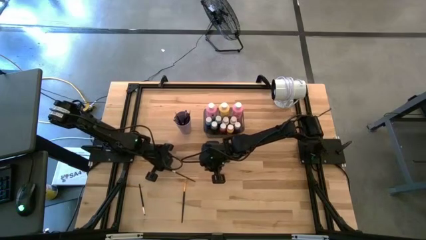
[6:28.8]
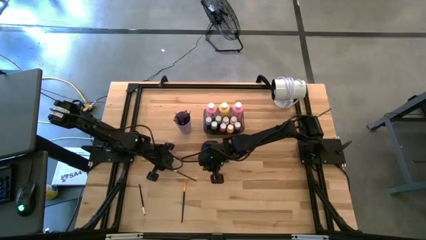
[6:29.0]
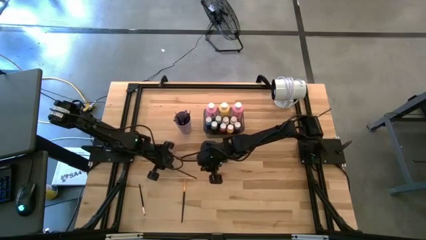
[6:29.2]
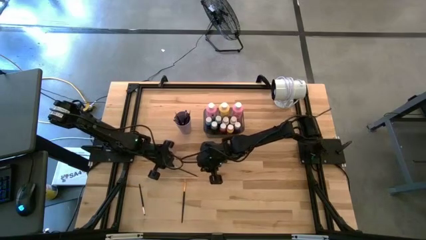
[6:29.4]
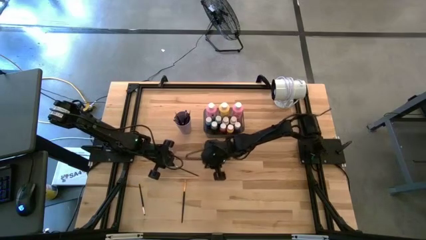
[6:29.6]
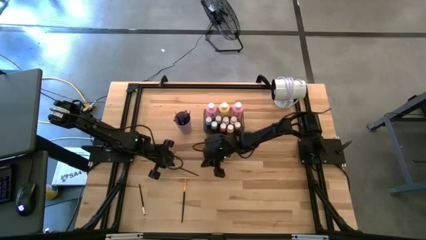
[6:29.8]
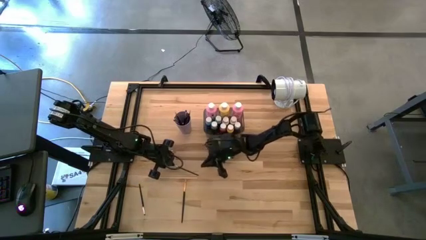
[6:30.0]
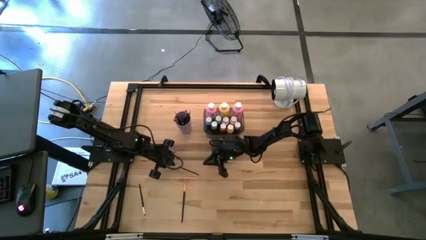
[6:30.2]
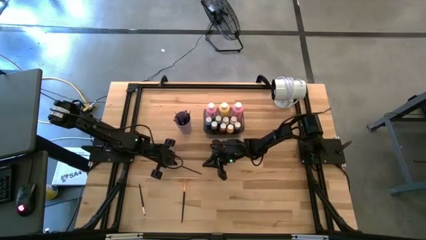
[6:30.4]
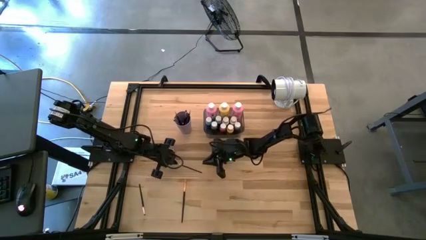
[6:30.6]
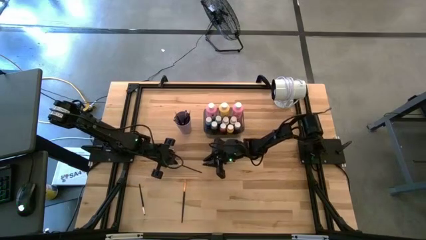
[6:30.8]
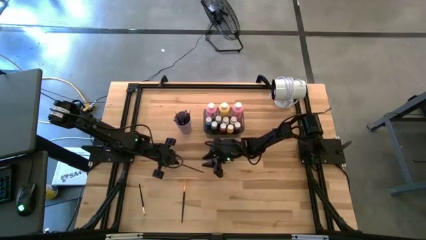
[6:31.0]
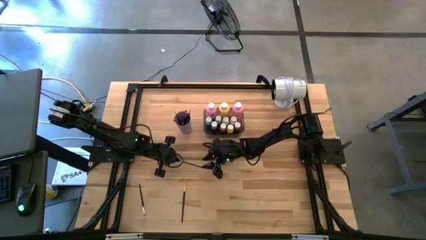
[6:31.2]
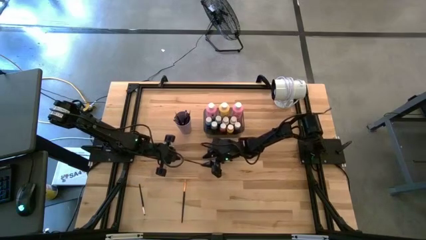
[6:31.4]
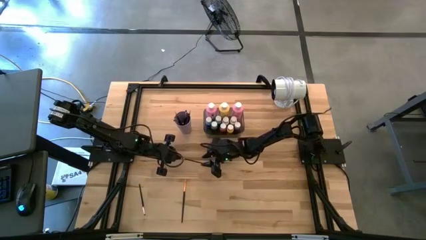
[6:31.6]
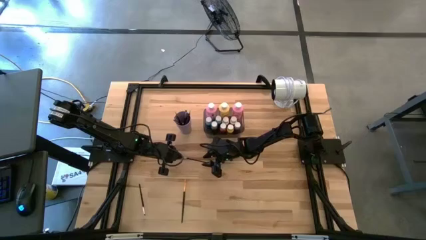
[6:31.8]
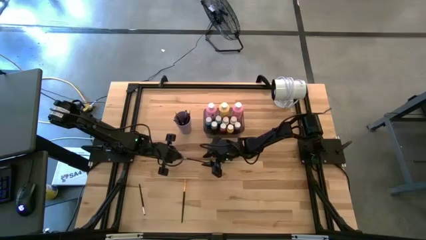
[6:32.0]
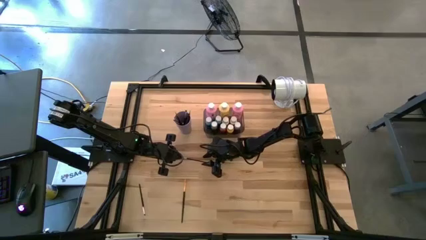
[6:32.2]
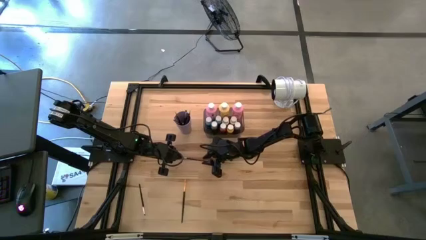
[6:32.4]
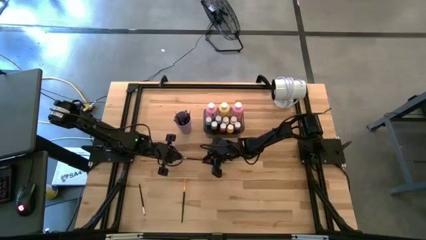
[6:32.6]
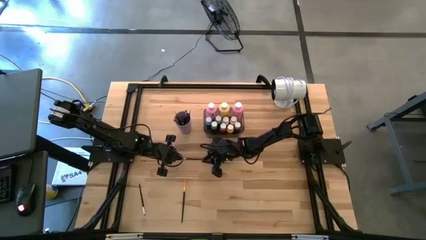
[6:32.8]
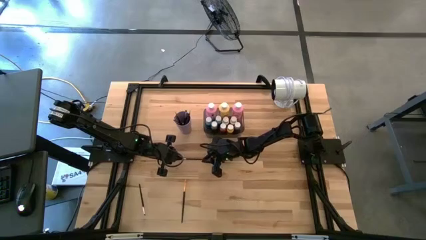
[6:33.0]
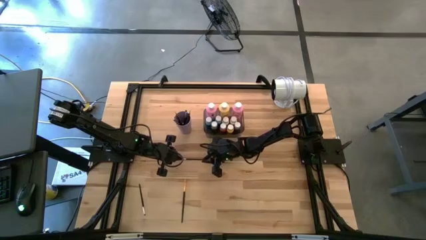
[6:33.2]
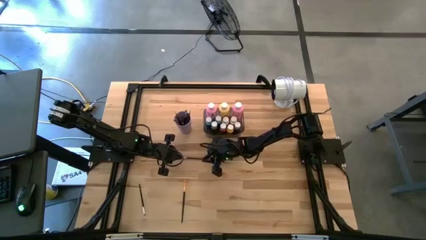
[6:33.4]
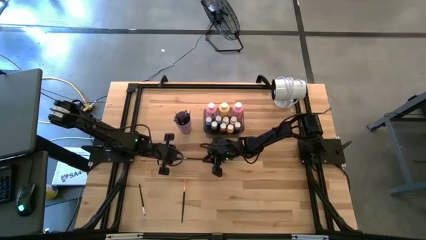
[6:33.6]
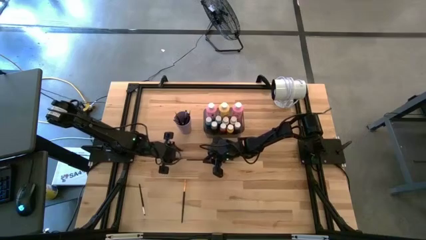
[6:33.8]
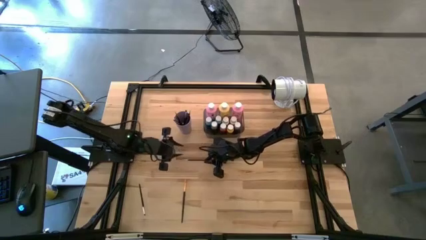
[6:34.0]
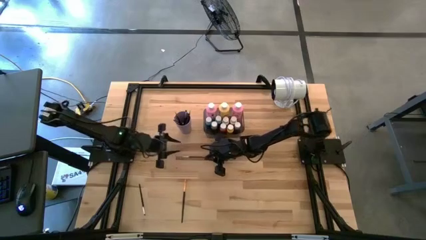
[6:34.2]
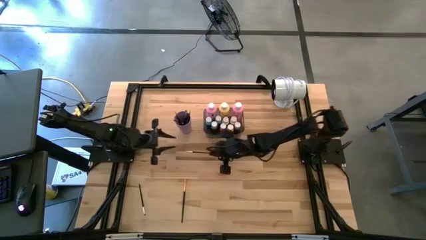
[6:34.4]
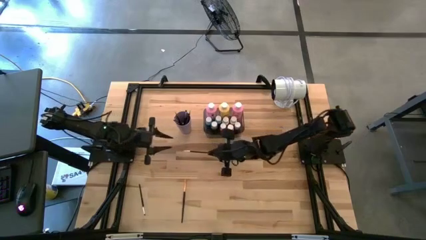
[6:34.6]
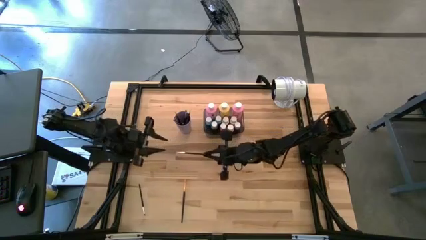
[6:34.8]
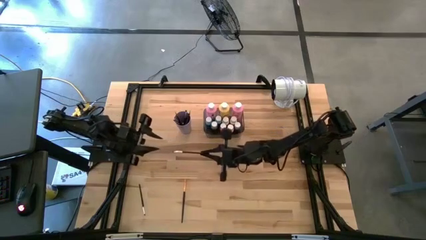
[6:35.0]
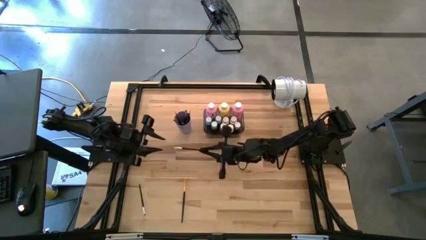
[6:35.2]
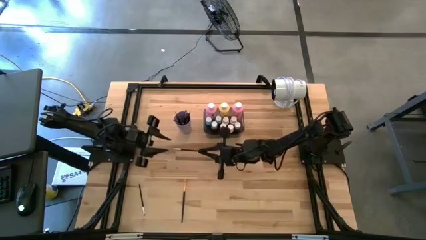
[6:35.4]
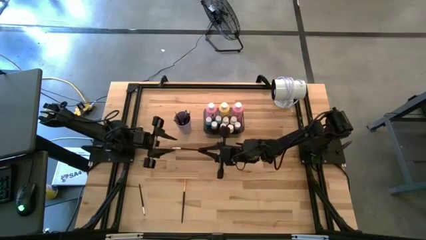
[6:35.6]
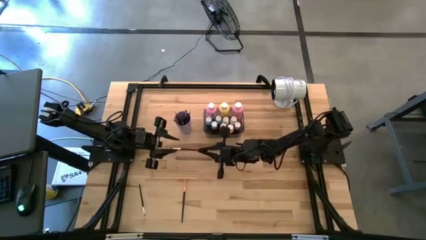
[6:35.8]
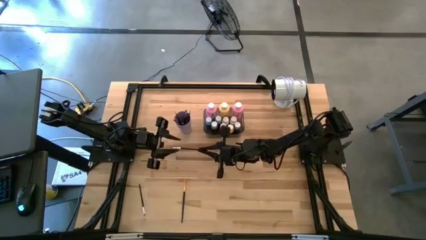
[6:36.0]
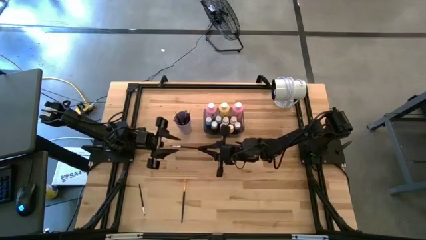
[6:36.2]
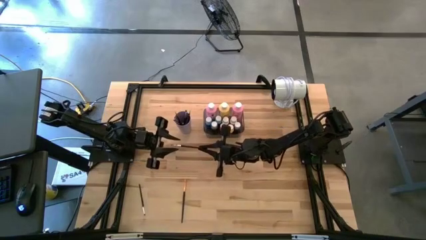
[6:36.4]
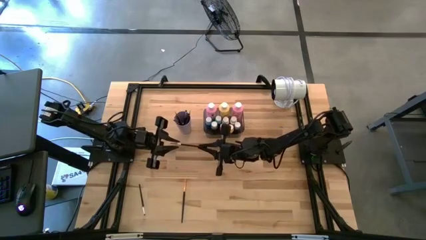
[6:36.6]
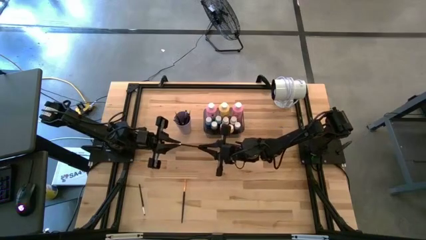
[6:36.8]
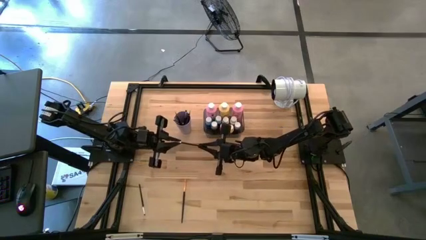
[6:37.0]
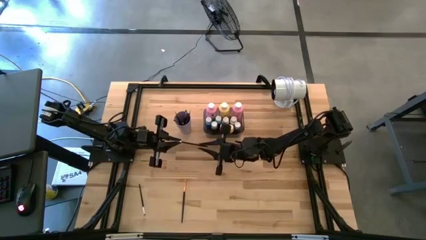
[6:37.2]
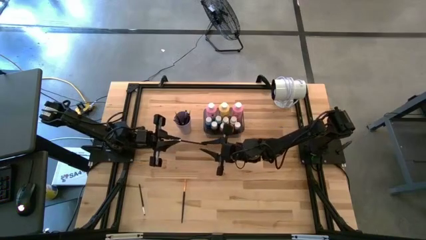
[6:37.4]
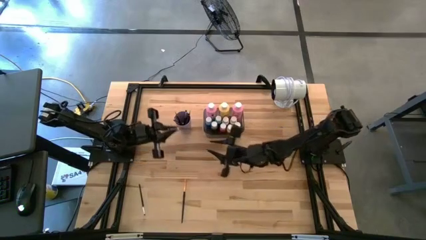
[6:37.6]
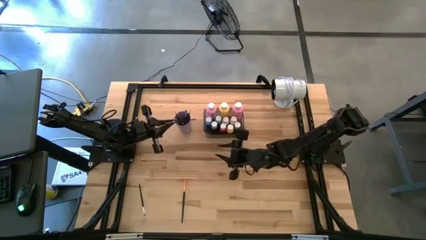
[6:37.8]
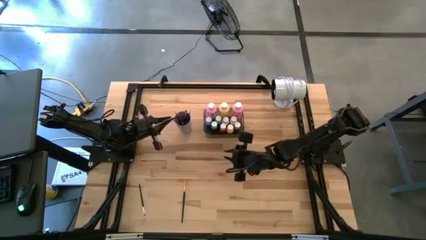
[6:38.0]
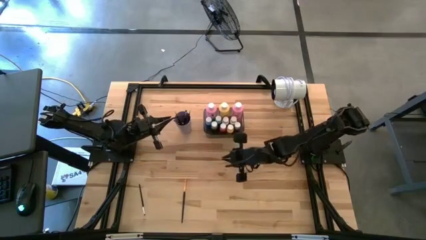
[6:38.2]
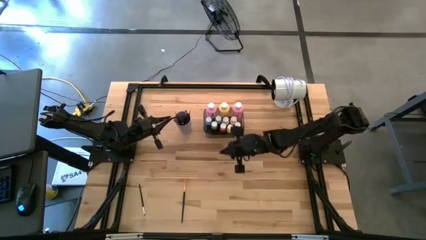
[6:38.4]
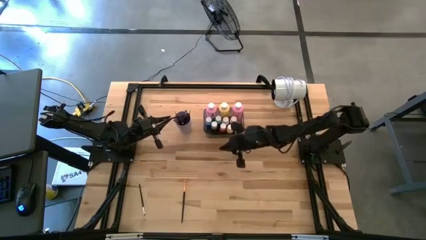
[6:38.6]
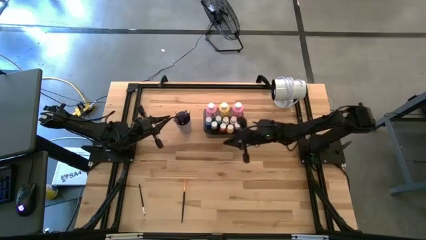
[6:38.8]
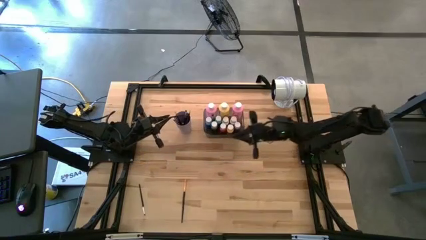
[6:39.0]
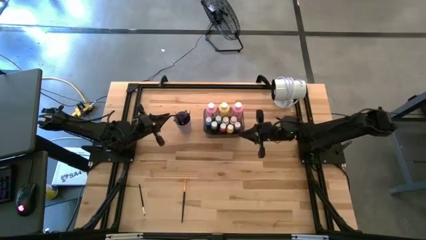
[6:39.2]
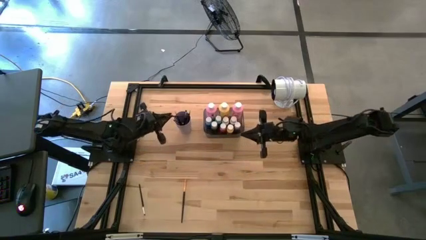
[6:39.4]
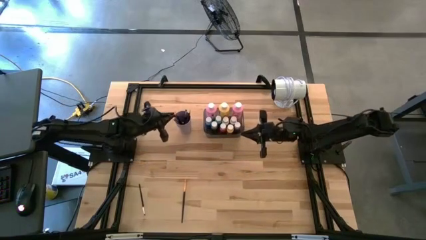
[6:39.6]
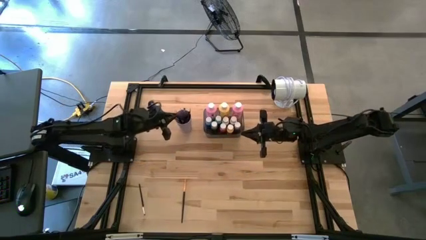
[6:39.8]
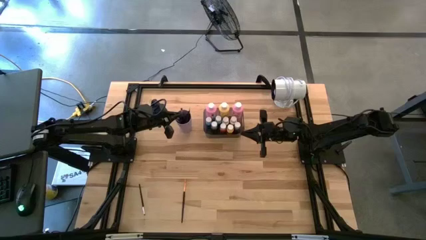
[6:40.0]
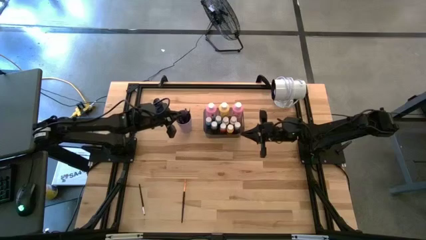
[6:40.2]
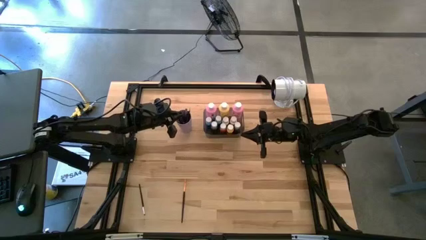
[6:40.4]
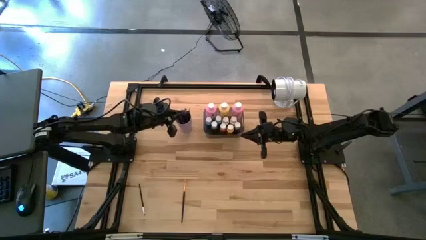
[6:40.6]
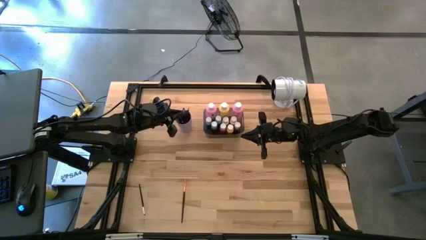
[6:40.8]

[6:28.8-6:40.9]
Task: Pick & Place Paint Supplies
Put the silver paint brush into the purple cup

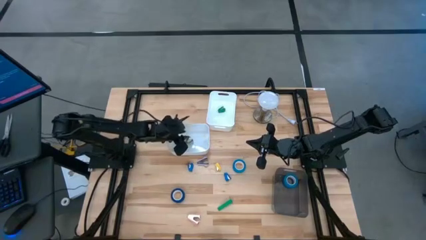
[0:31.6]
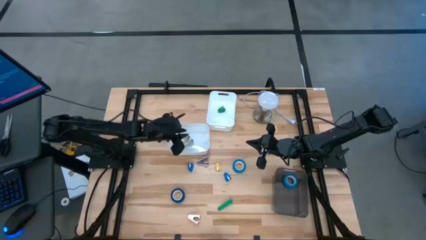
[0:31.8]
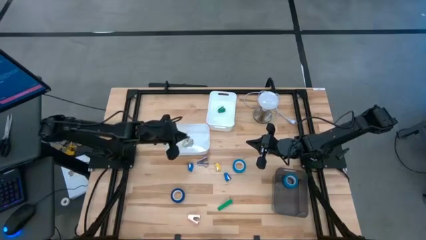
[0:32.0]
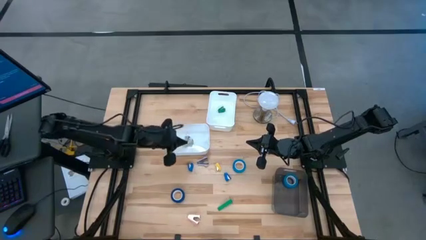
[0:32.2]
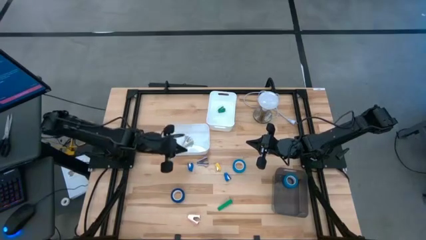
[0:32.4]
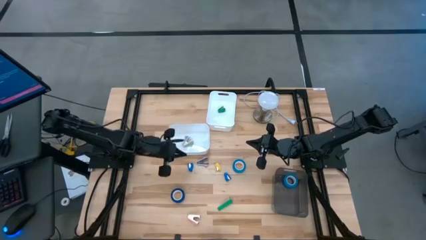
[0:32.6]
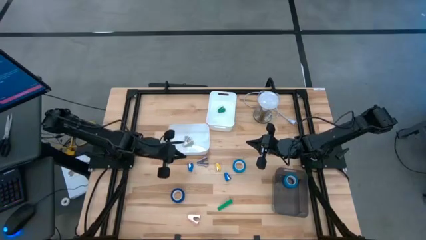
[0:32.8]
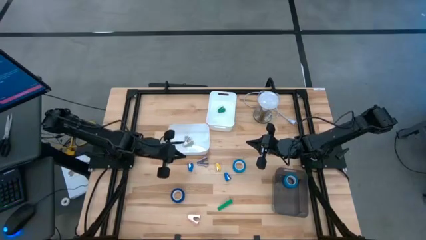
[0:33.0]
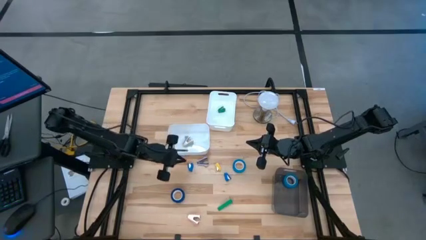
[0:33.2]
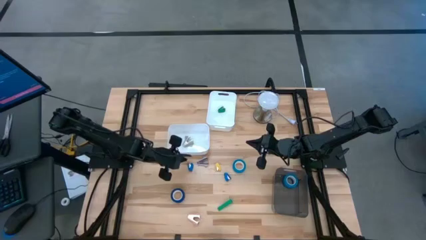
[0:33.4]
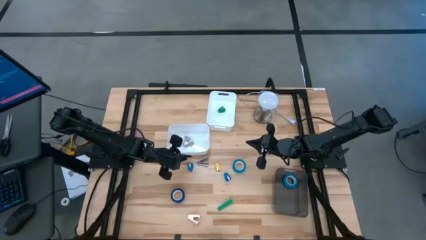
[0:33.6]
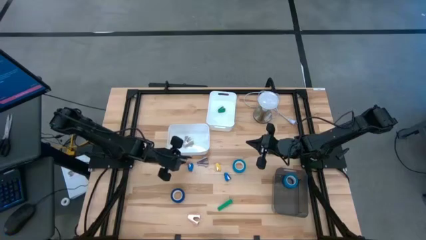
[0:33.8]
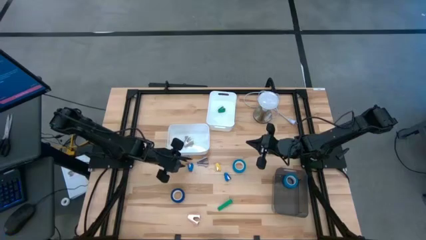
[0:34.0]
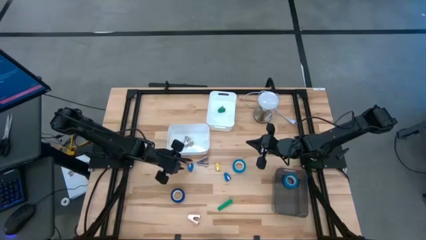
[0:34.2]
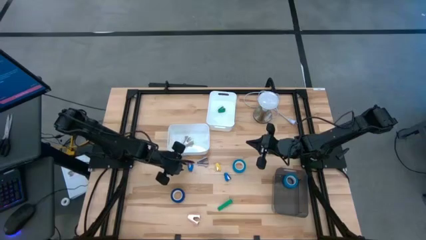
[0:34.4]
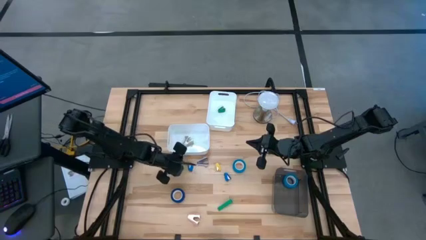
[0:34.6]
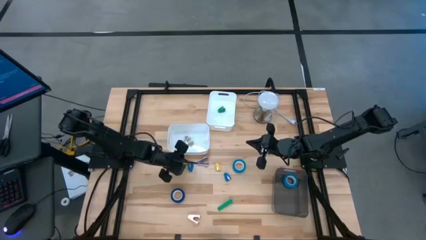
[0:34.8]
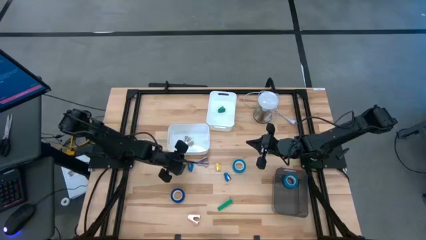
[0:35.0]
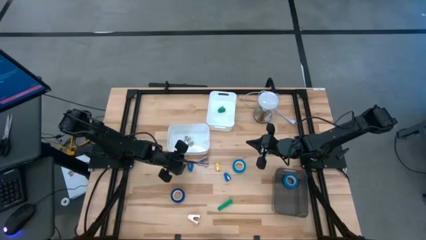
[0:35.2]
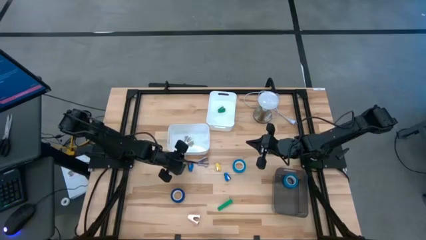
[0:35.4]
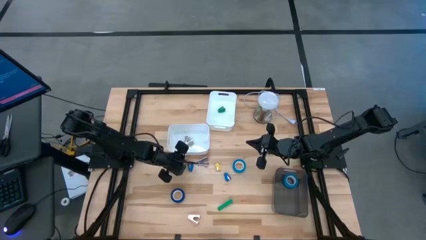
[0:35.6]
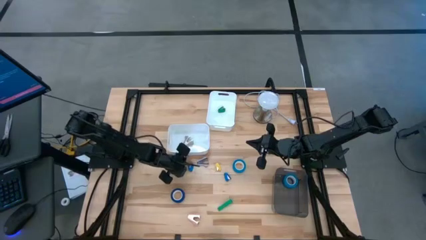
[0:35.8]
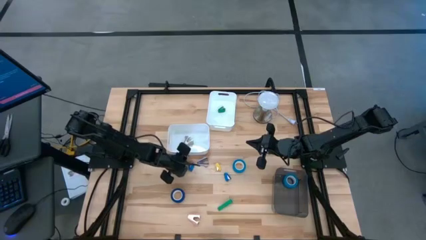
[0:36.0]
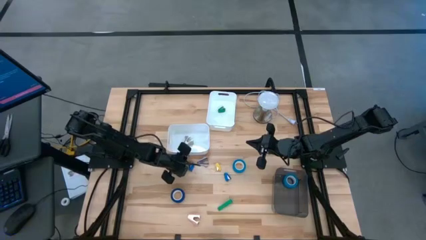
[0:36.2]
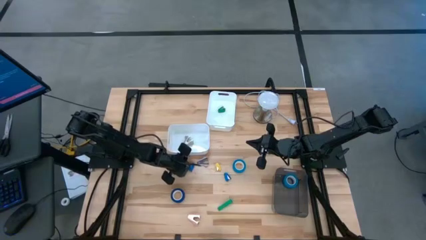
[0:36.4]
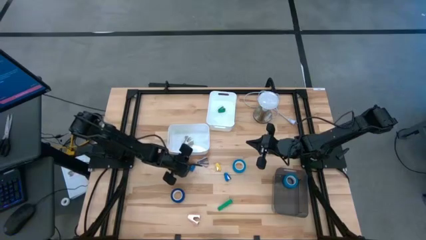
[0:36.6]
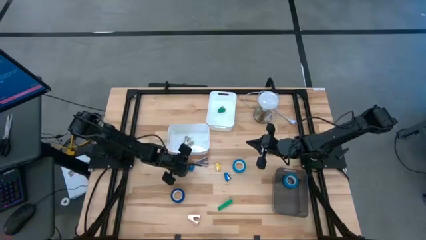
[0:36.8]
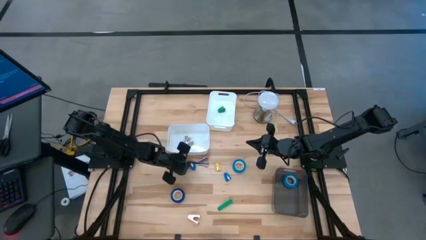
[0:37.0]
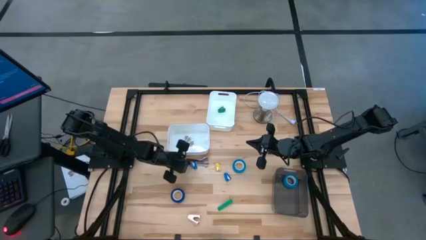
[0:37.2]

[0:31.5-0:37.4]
Task: Pick and place Stapler, Stapler remover, tape
Put the left blue stapler into the top white bin
